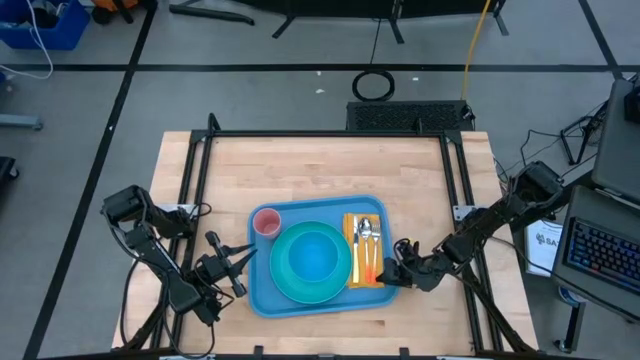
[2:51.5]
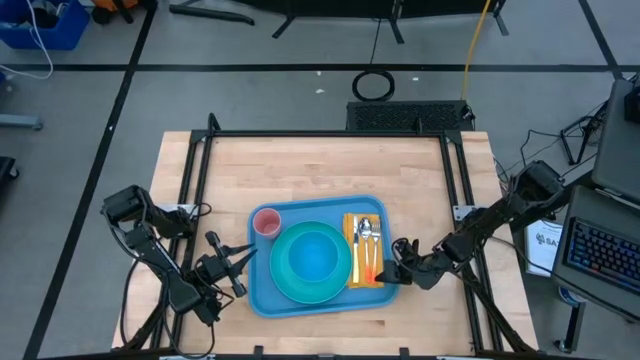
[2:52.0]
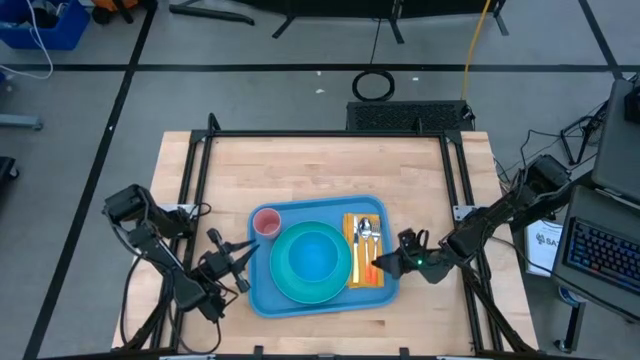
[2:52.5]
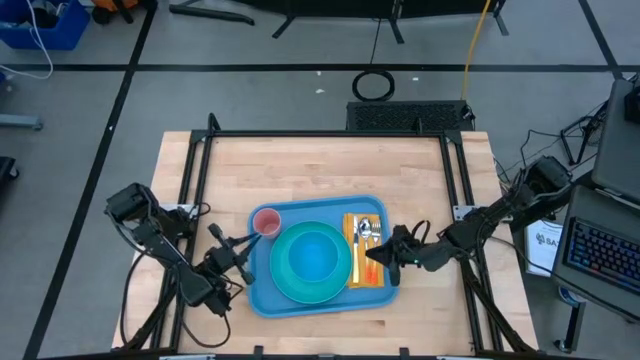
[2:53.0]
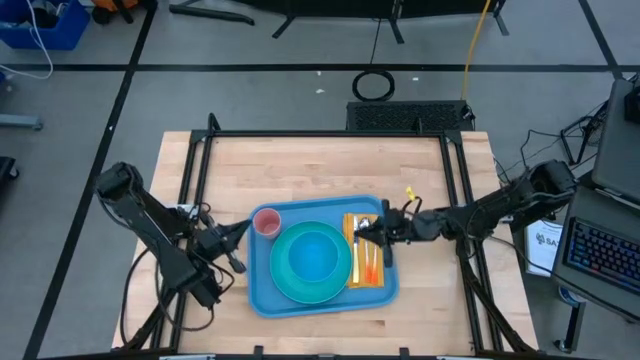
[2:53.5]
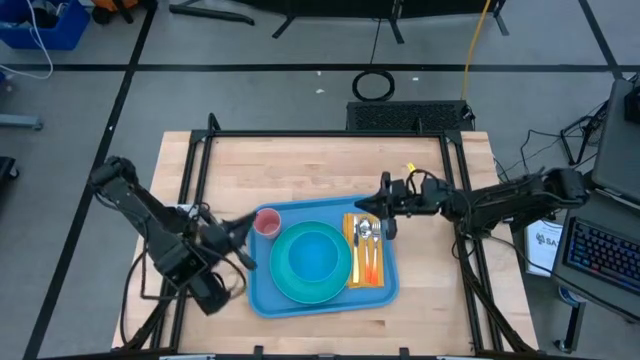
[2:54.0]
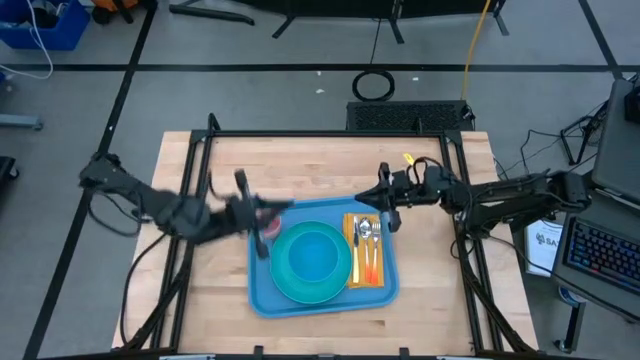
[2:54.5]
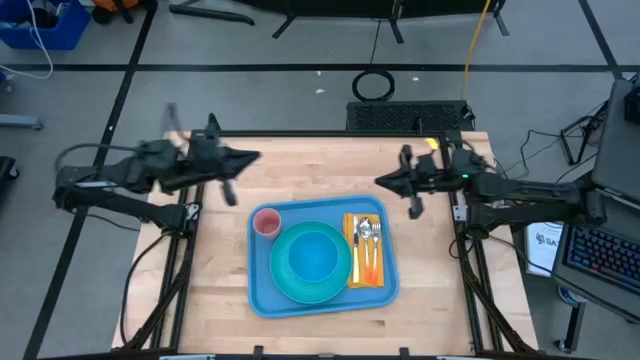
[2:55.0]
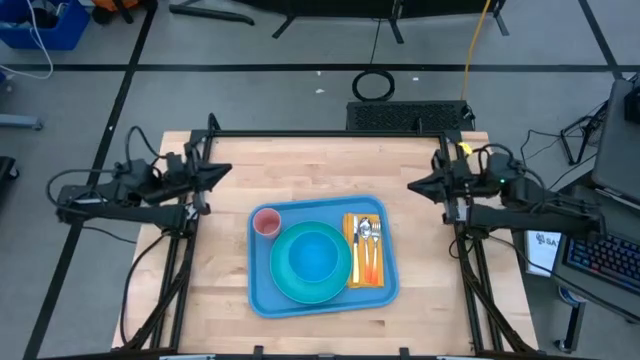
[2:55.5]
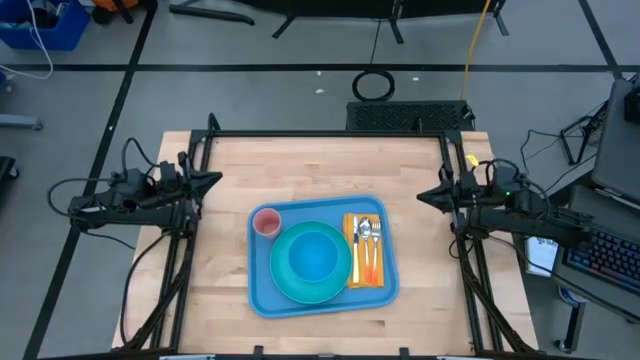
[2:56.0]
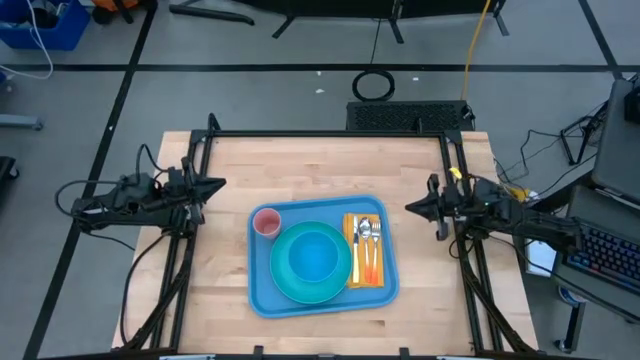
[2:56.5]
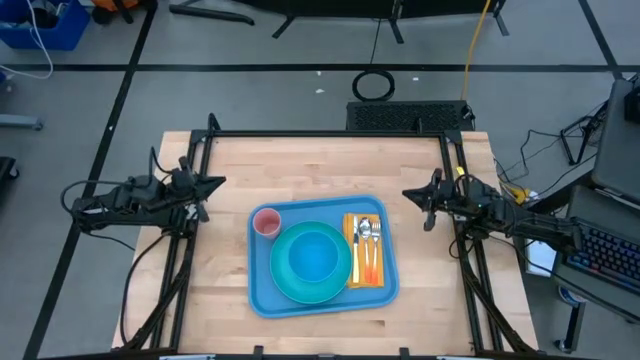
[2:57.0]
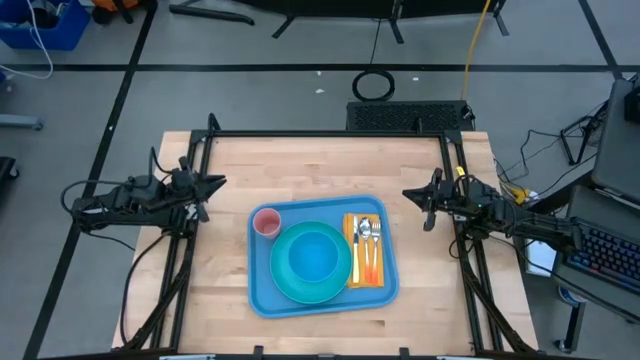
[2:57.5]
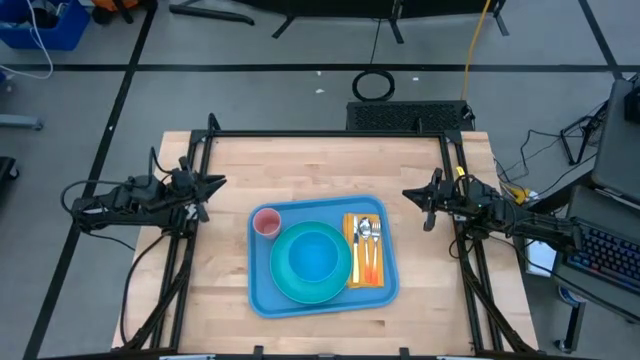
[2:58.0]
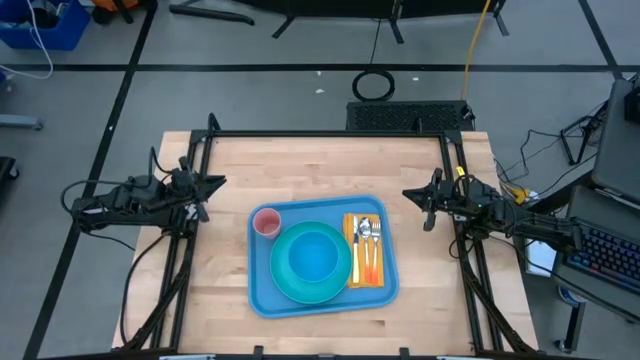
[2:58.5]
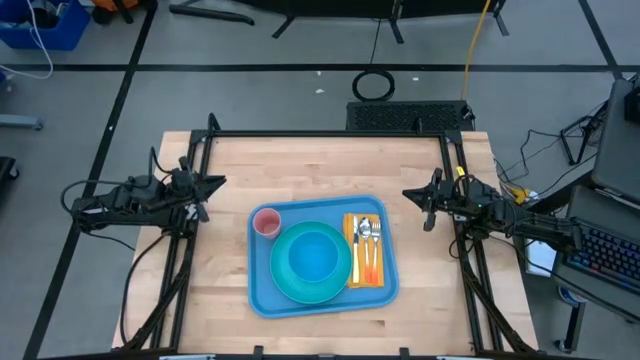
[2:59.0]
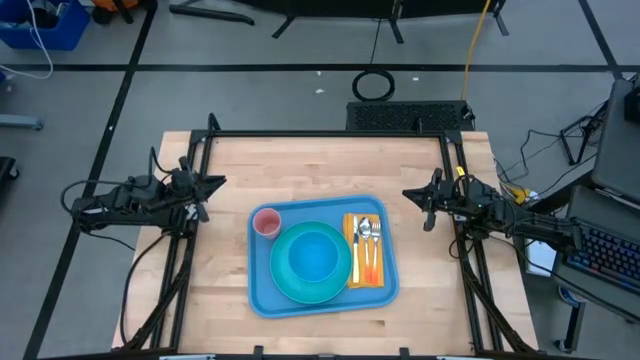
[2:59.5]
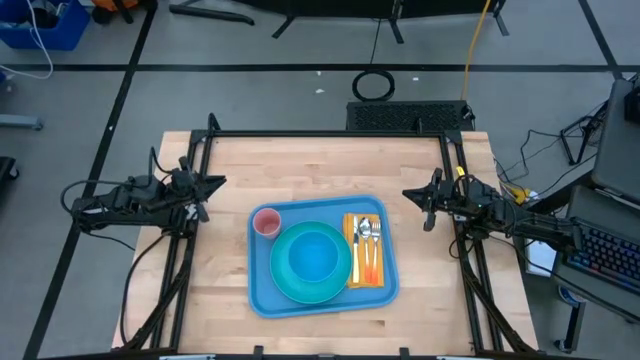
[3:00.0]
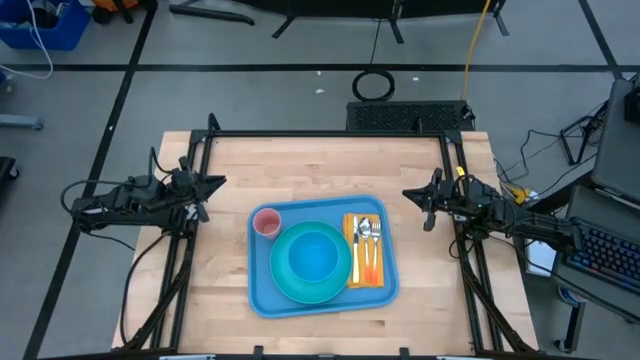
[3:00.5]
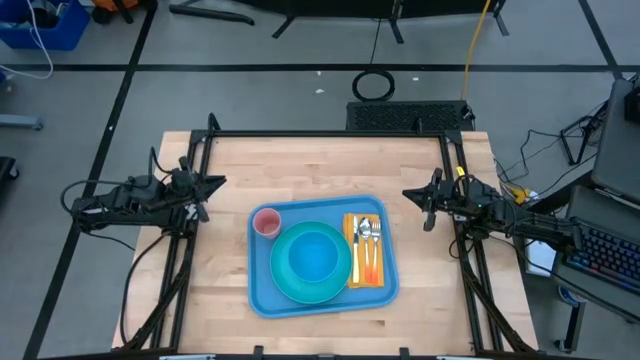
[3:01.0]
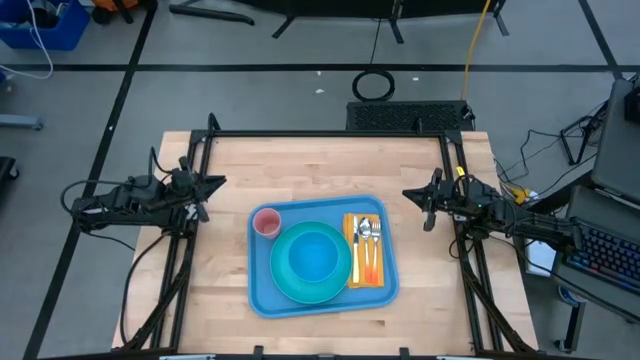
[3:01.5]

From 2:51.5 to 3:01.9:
Task: Set up tray
Return to Home Position

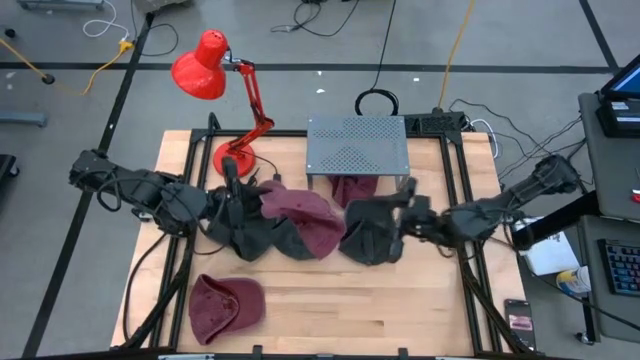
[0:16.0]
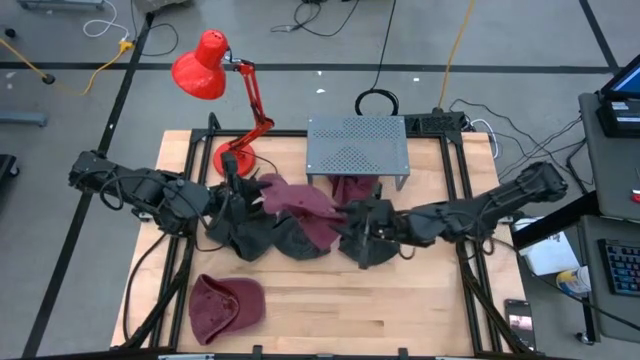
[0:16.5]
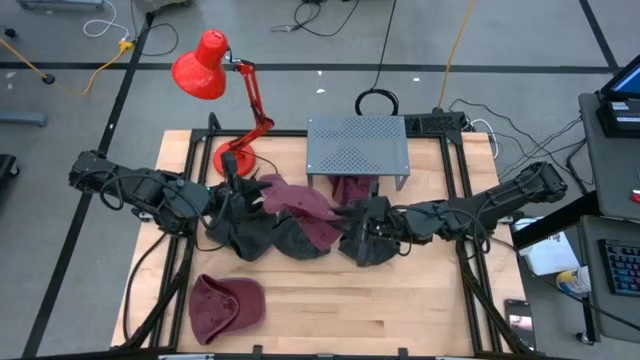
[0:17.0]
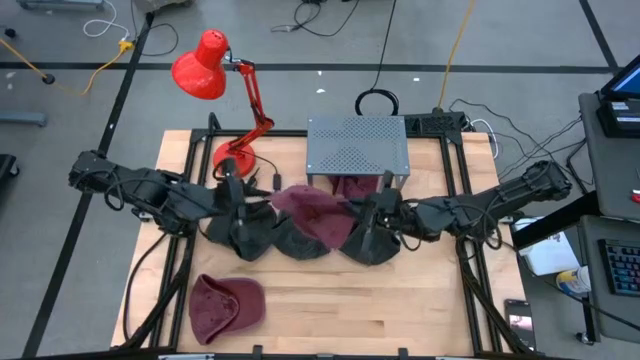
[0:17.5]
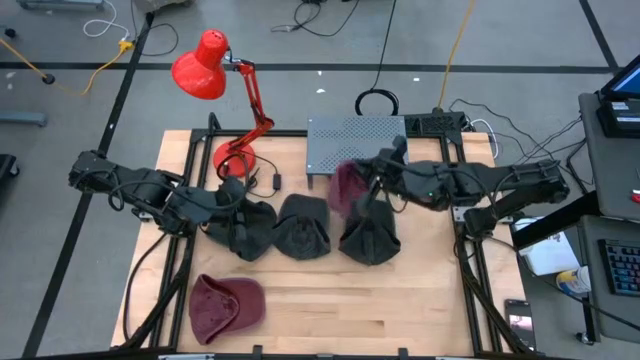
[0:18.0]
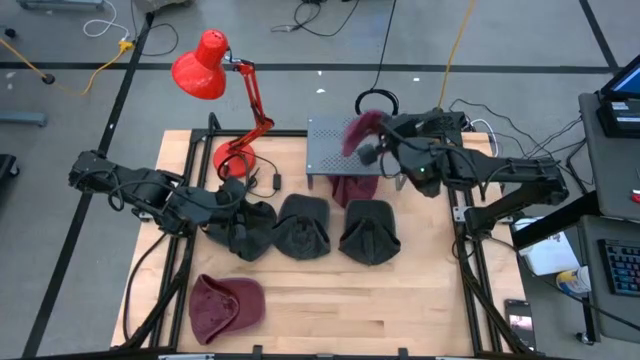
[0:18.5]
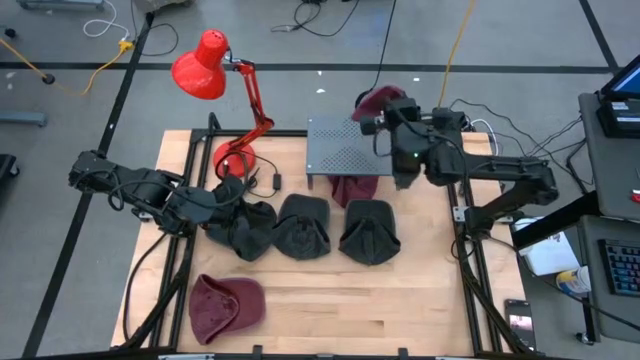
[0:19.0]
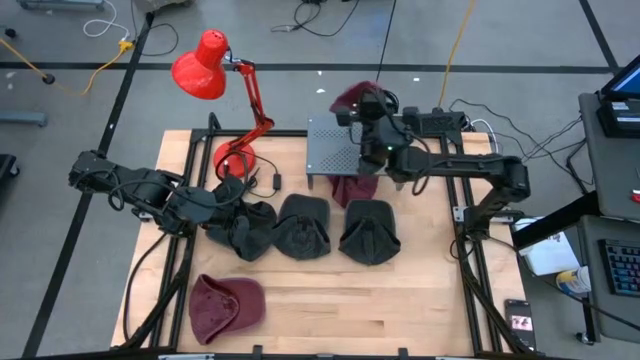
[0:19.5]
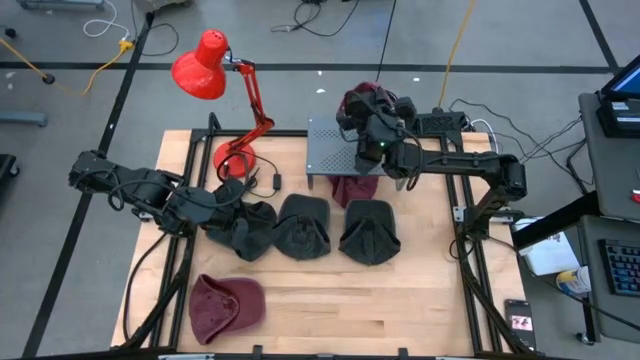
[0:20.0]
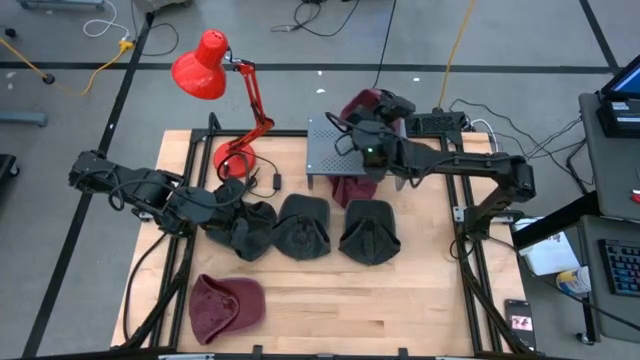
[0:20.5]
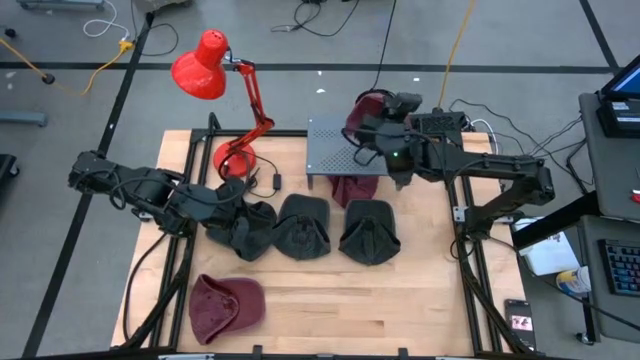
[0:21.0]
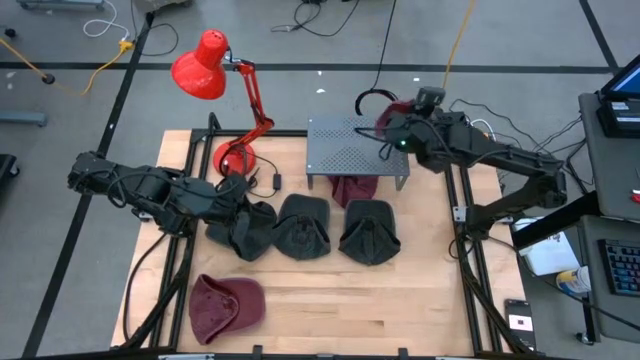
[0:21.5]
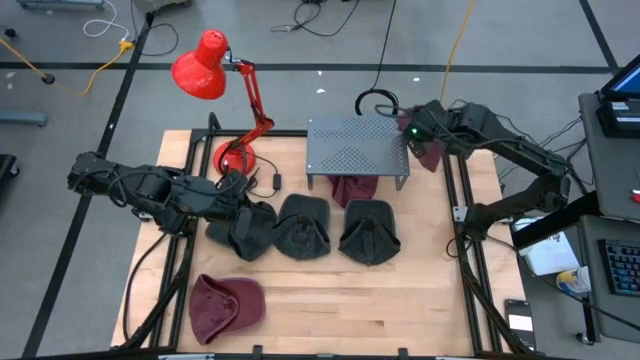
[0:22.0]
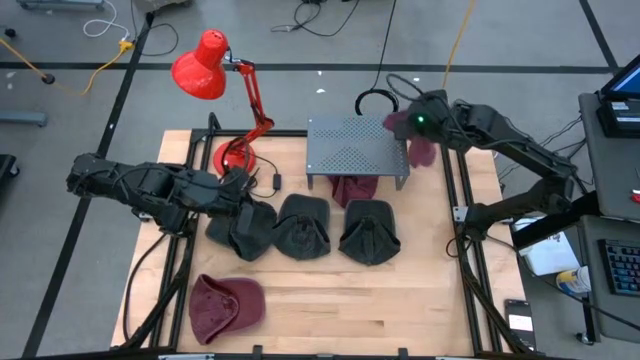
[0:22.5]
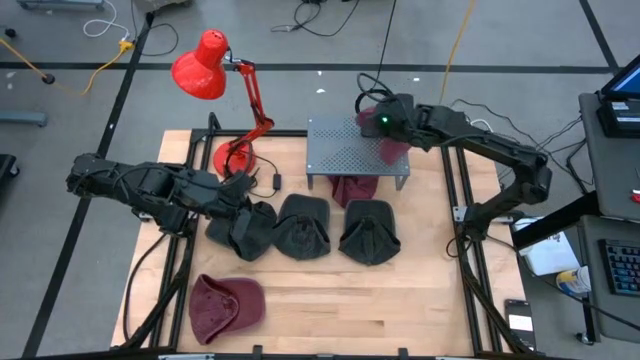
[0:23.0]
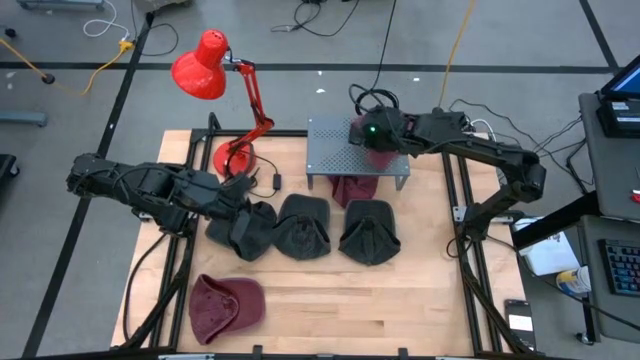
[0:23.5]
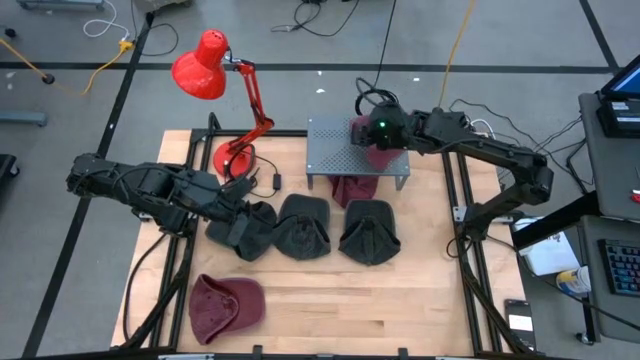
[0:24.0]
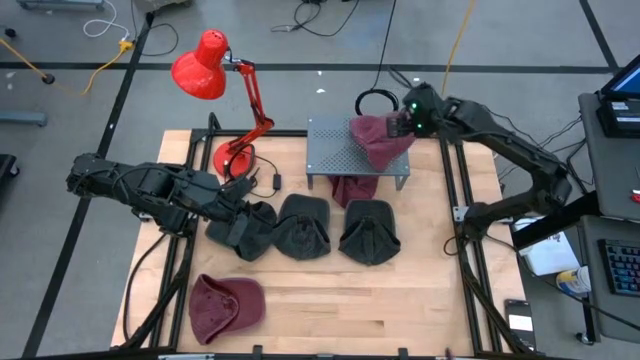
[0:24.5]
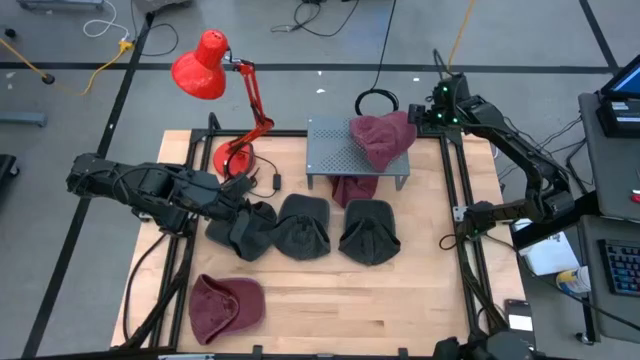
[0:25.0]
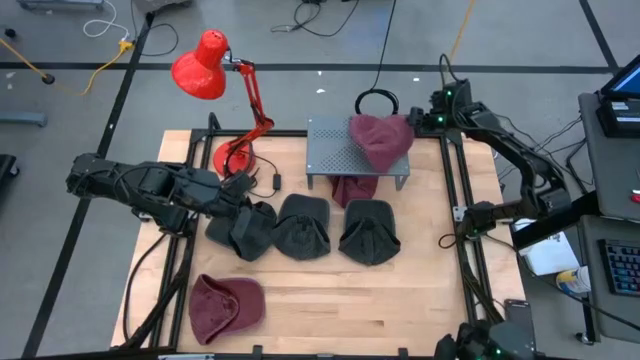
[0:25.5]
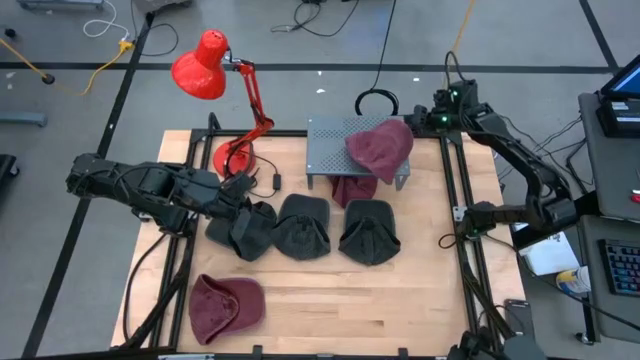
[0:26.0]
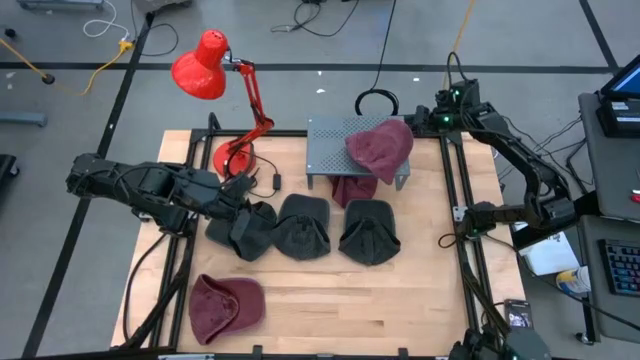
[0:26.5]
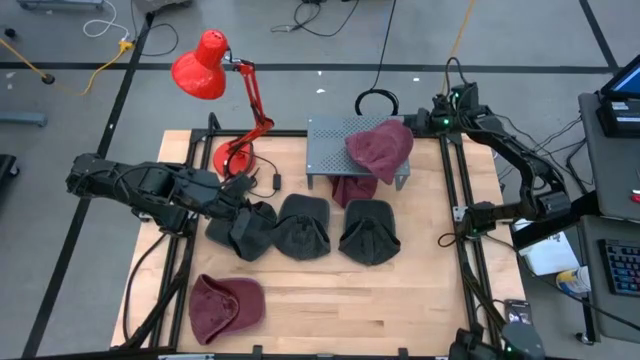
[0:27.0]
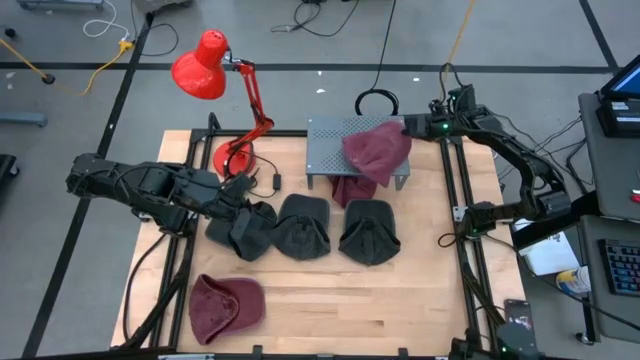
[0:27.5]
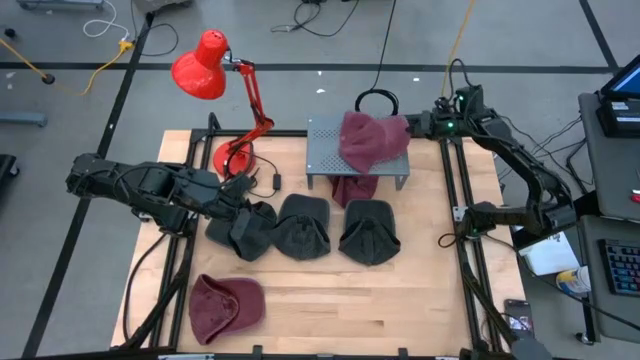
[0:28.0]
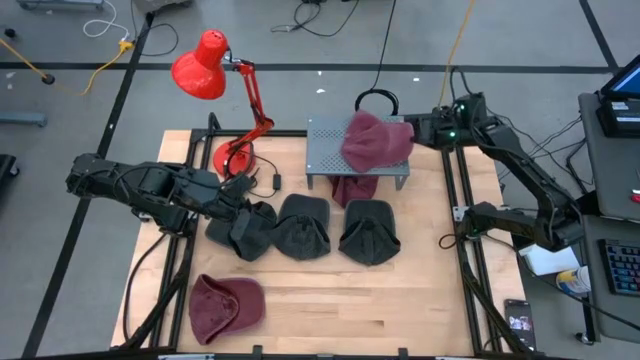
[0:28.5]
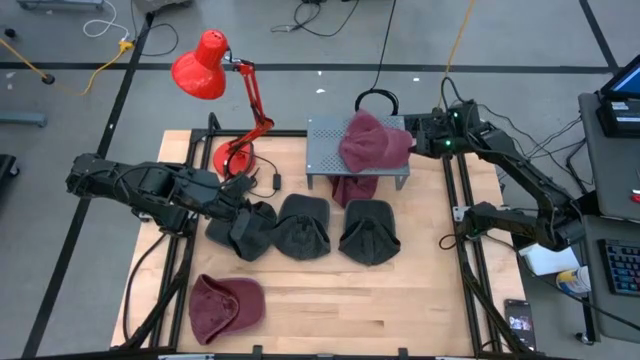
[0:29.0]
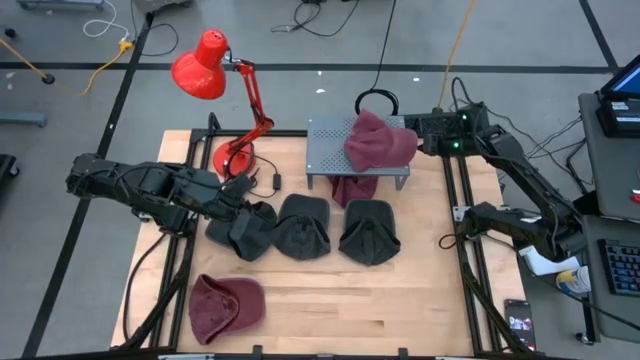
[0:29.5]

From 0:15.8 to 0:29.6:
Task: Pick & Place hat
Put the bottom right cap on the shelf
